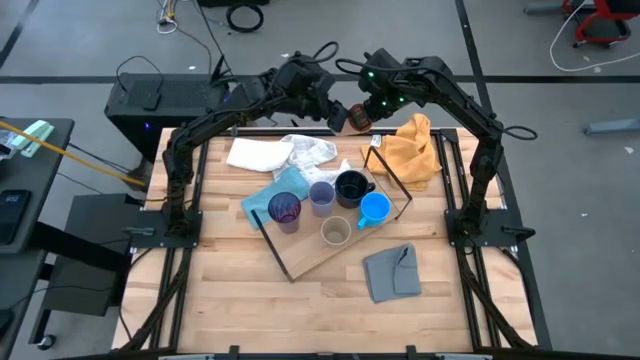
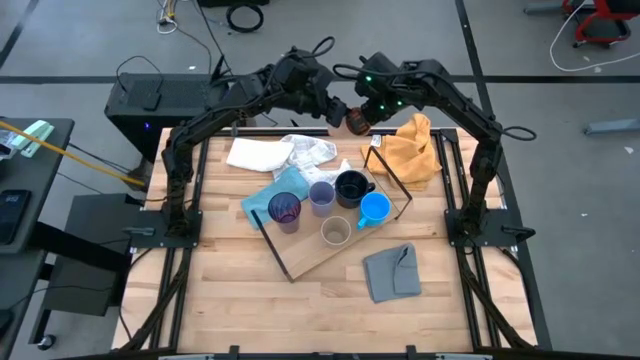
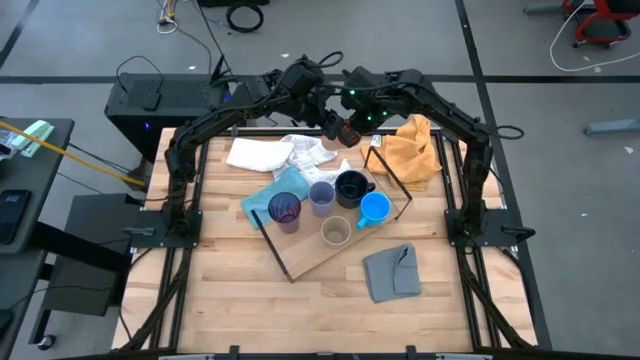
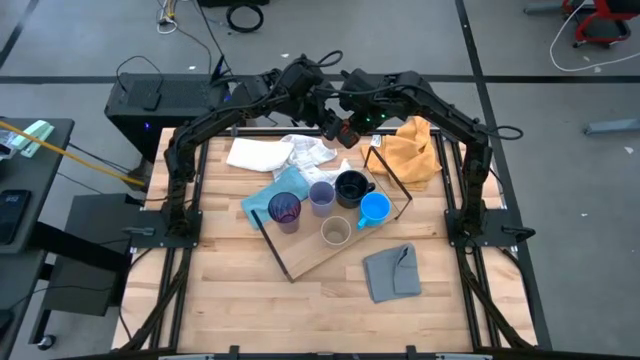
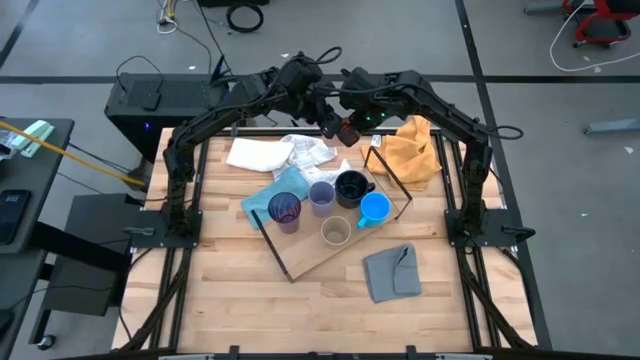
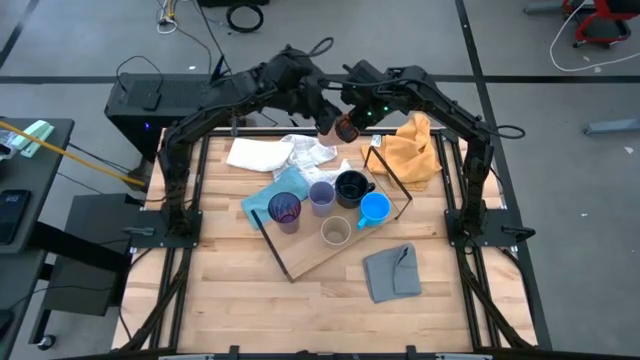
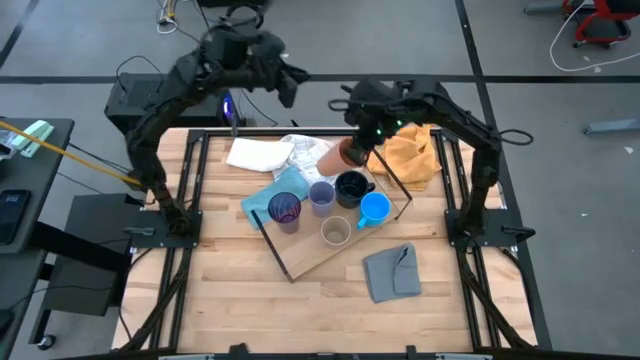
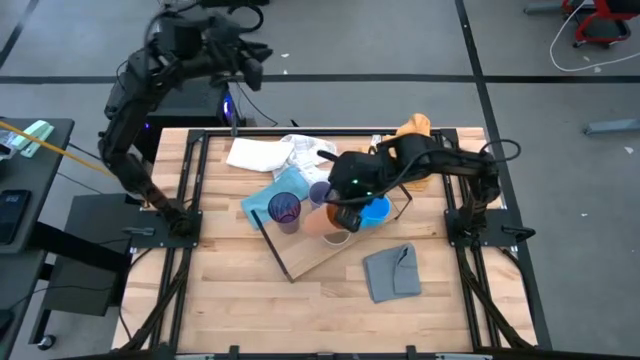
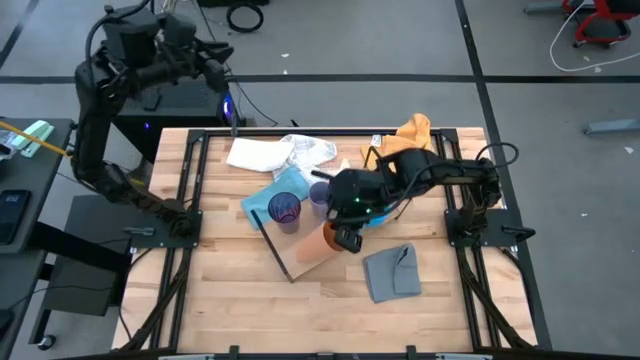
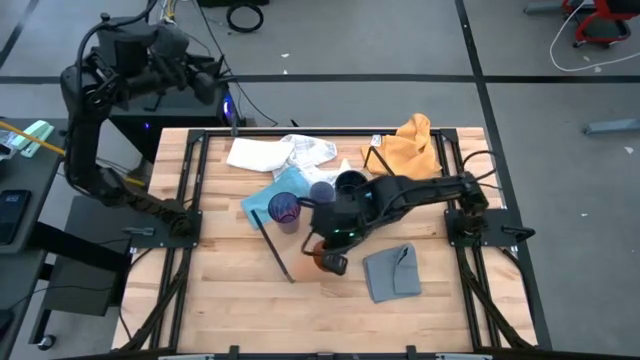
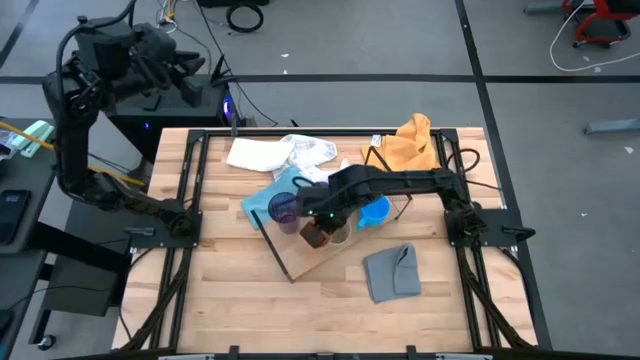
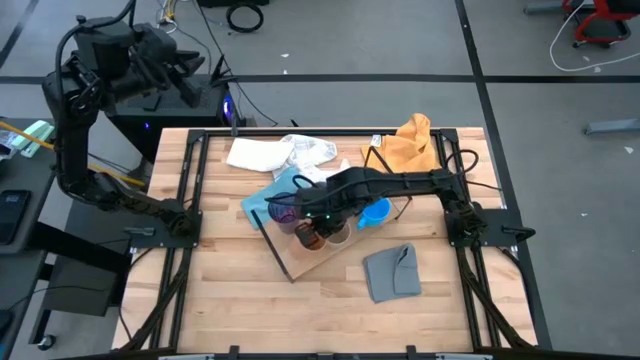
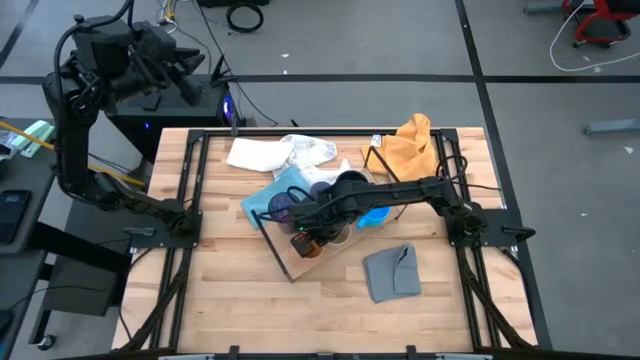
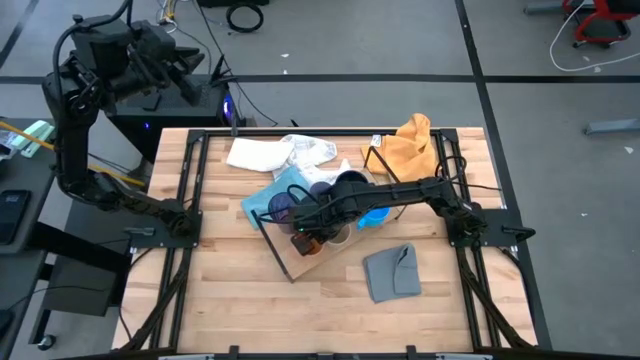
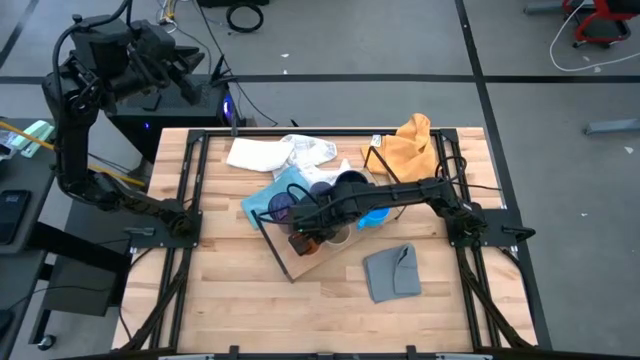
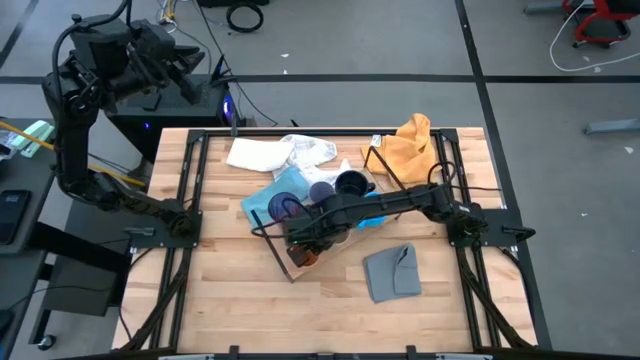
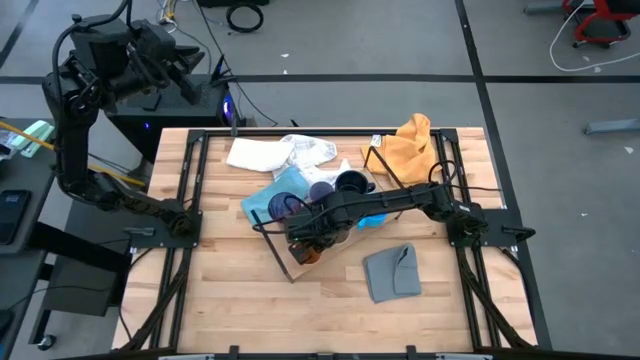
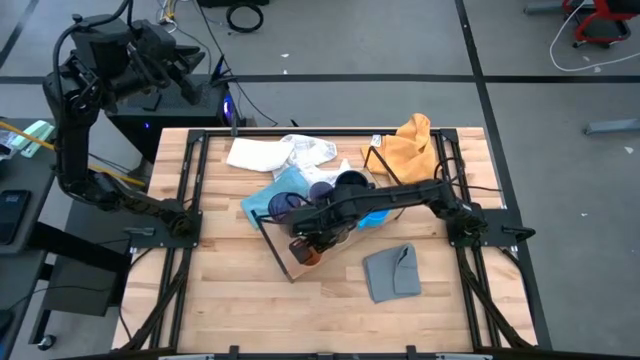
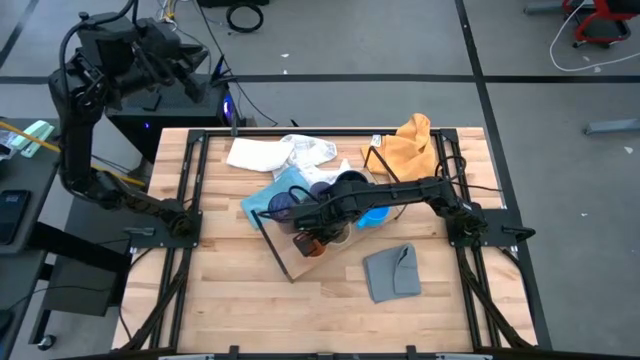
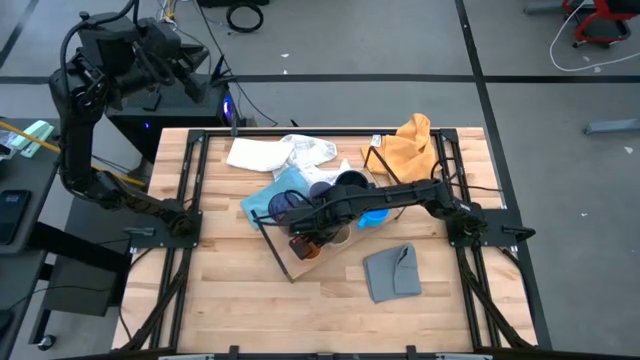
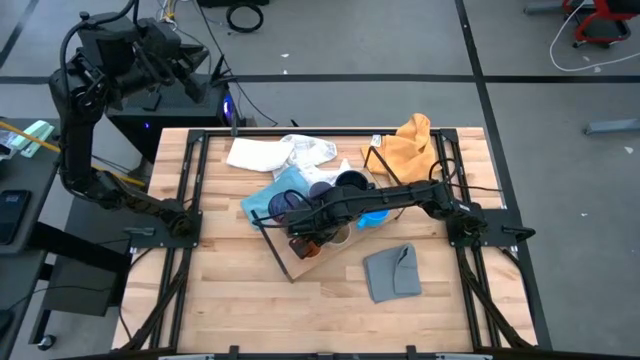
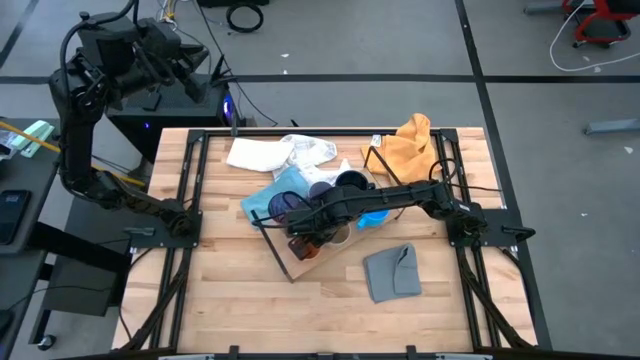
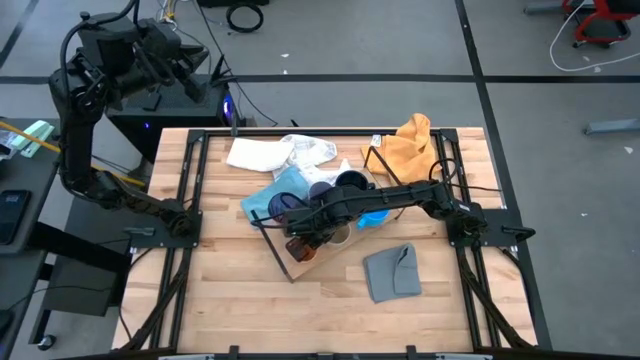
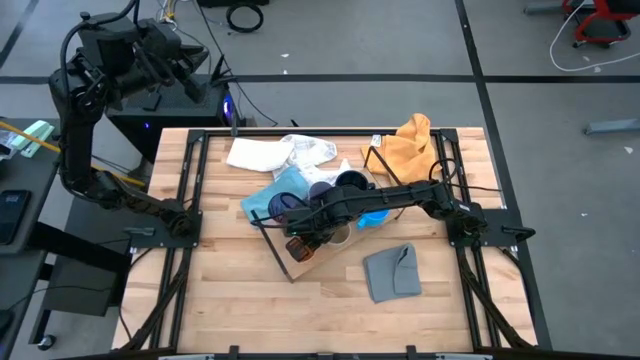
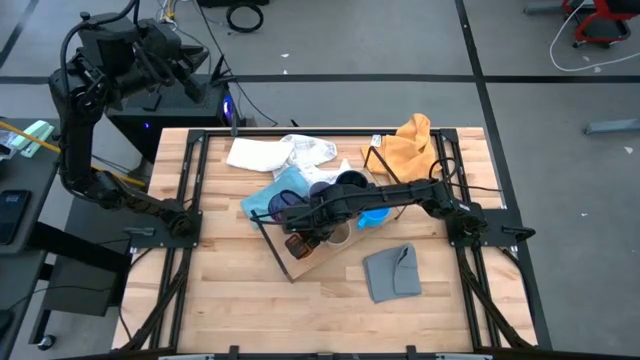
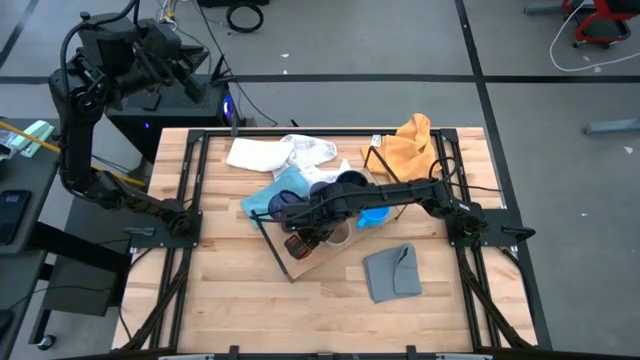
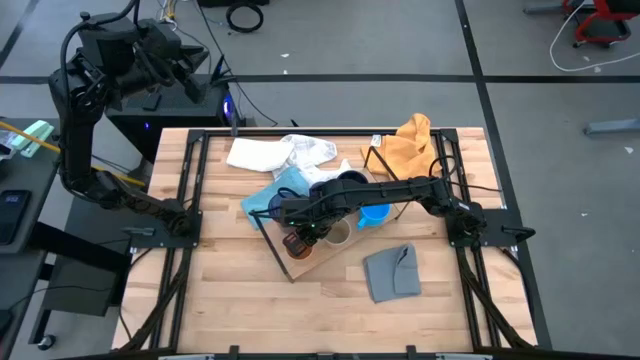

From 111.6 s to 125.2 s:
Task: Stack small to large cups/mugs on shelf
Put the orange cup on the shelf

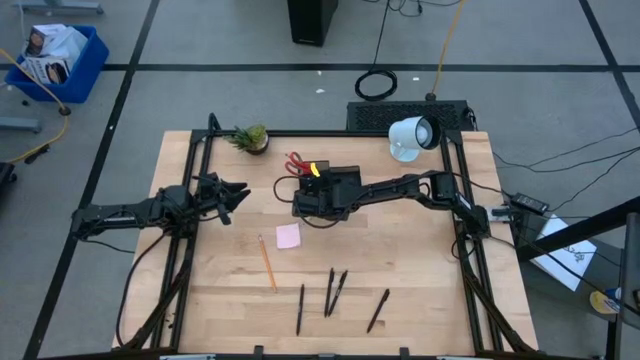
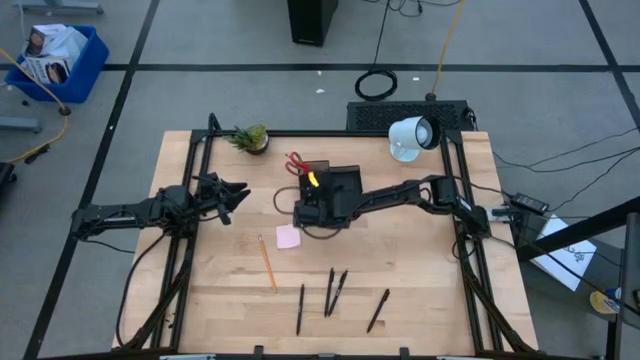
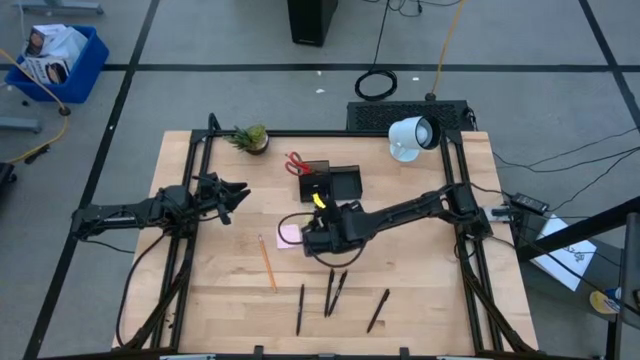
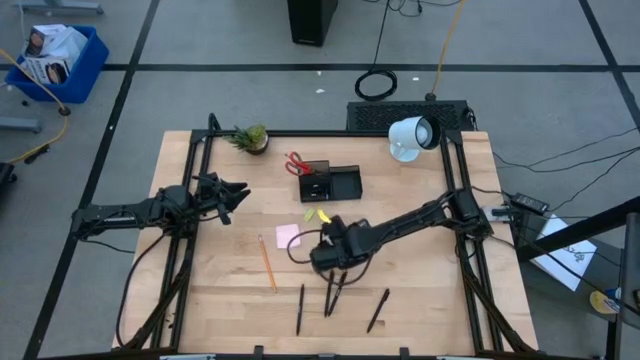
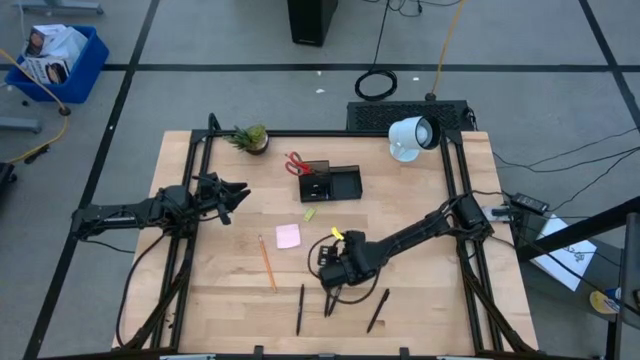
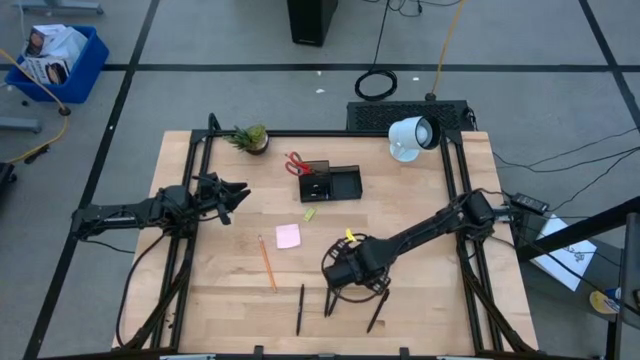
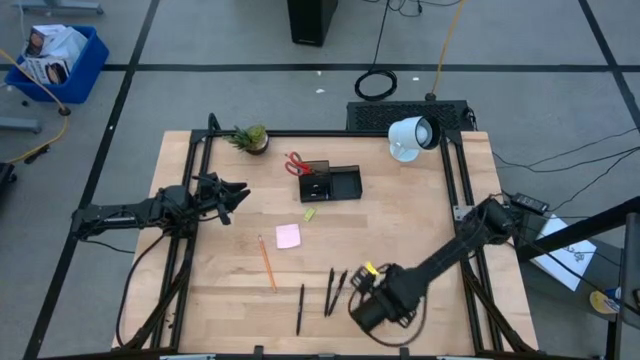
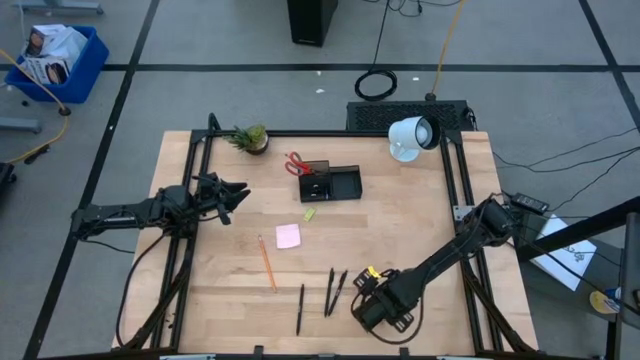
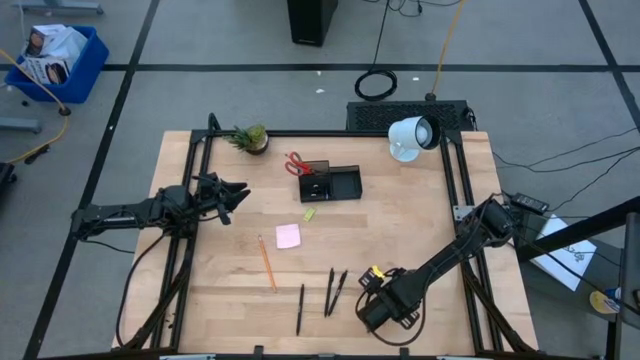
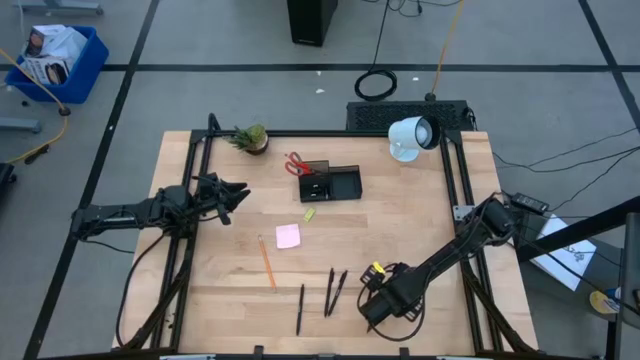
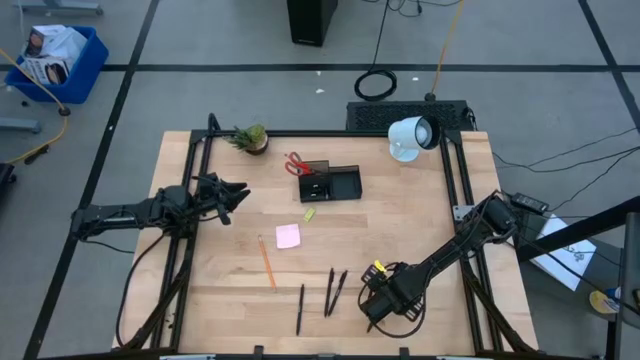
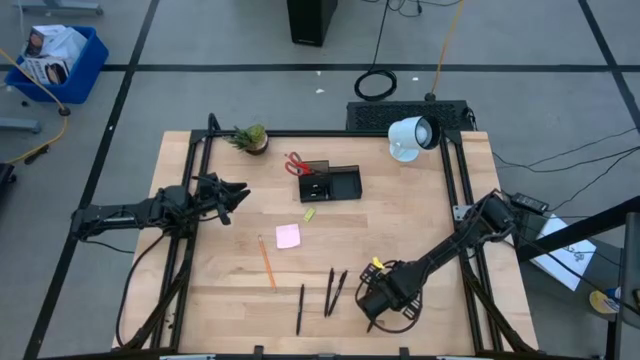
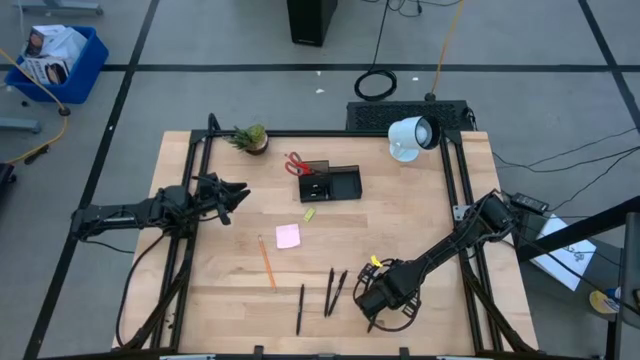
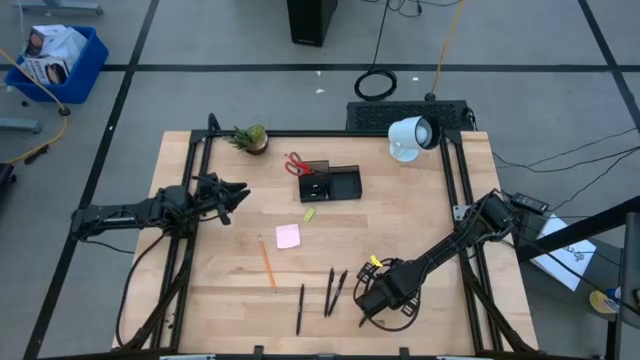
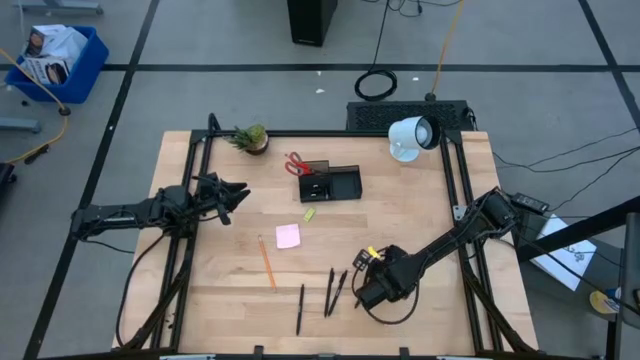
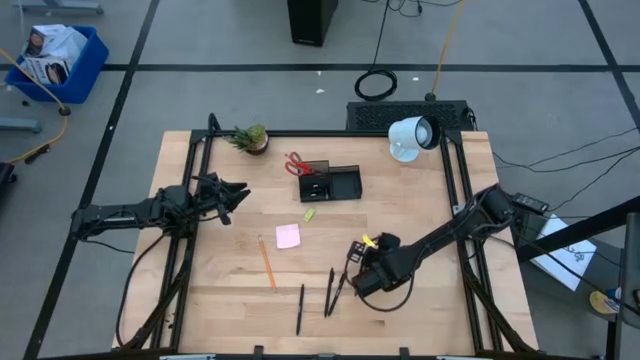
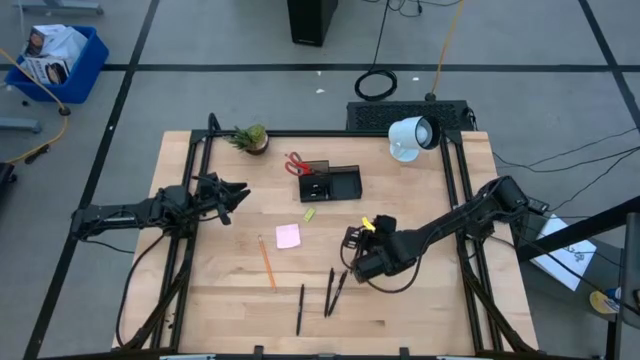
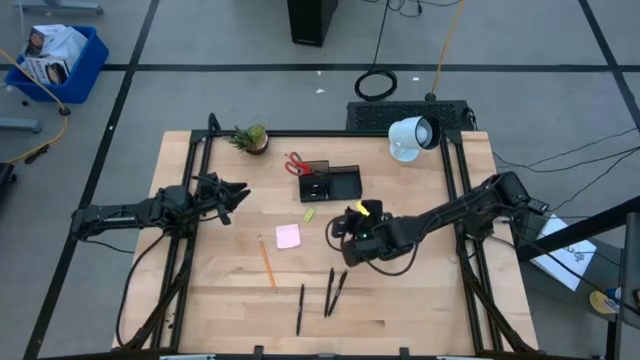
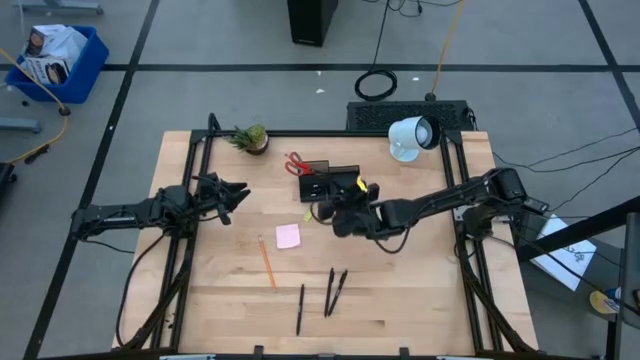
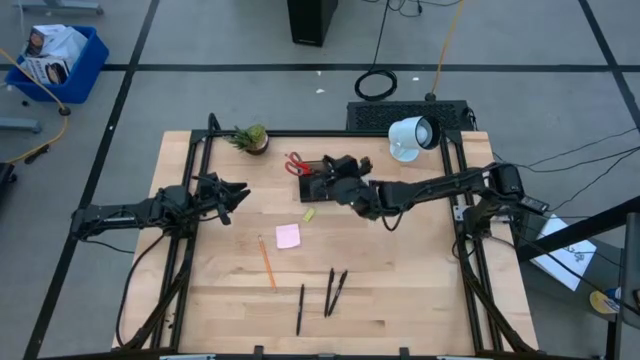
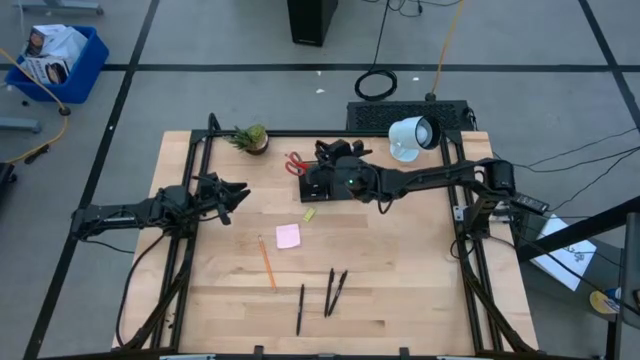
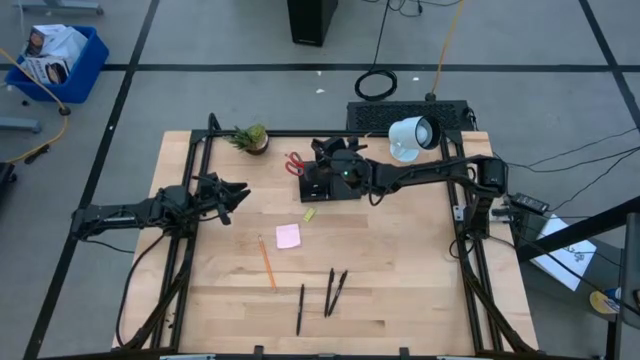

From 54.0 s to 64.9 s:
Task: Pick and place office supplies into organizer
Put the right pen into the mesh organizer
